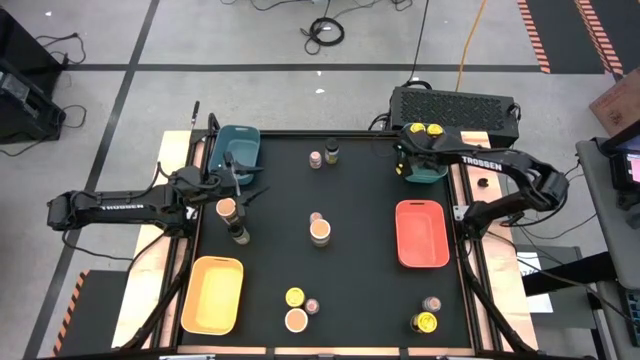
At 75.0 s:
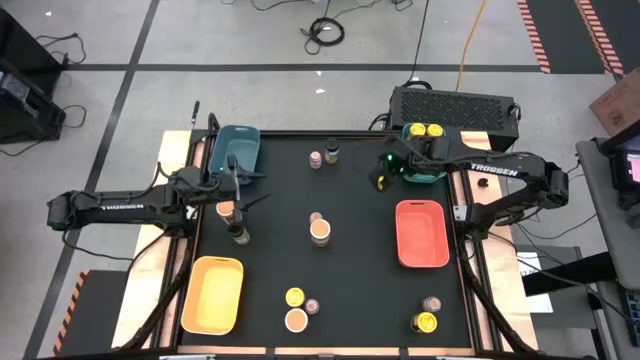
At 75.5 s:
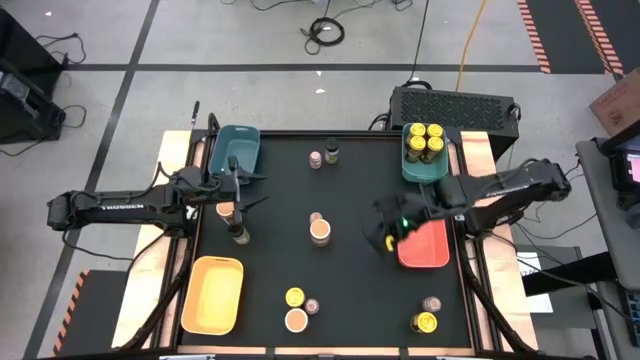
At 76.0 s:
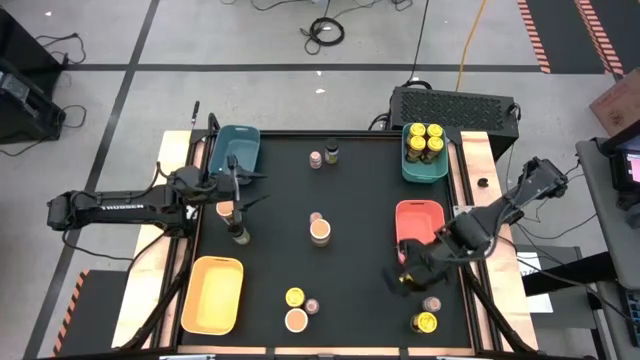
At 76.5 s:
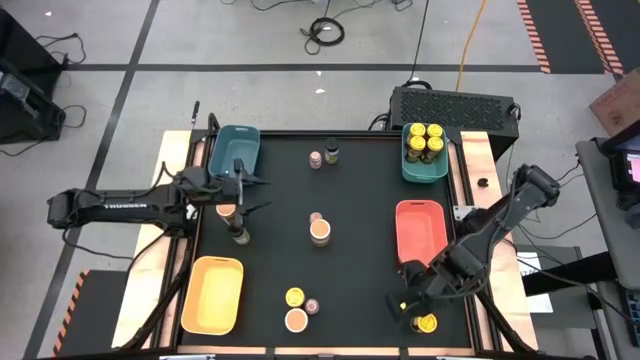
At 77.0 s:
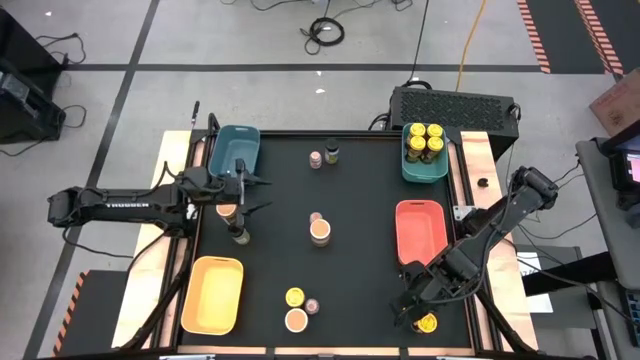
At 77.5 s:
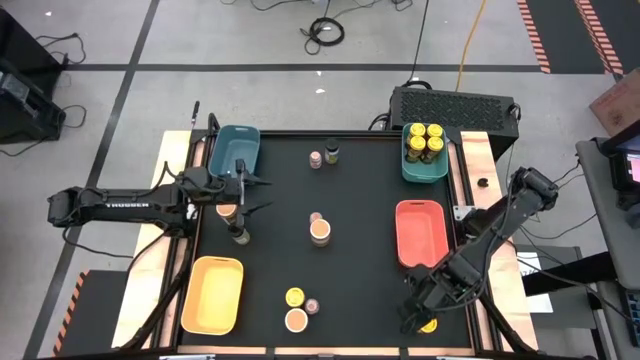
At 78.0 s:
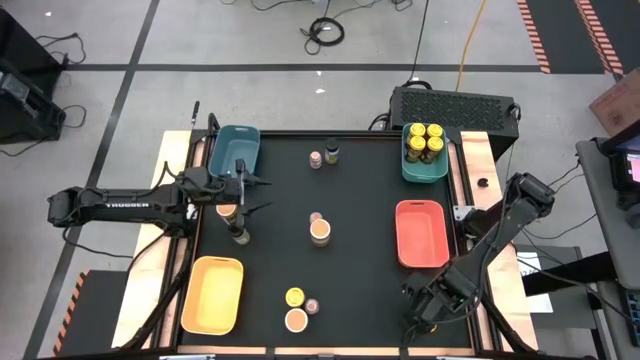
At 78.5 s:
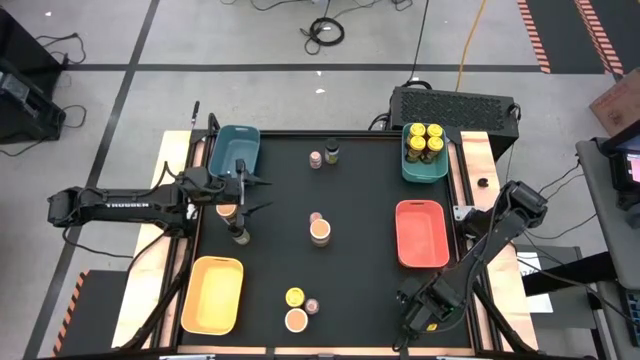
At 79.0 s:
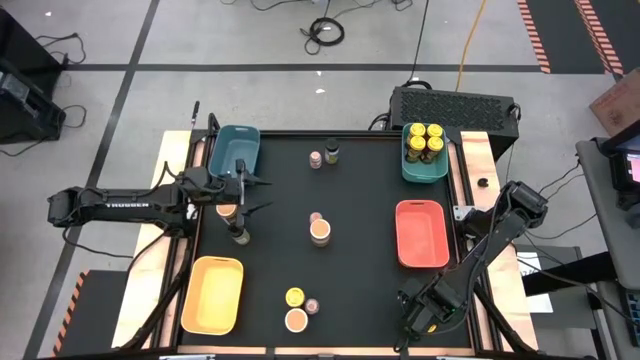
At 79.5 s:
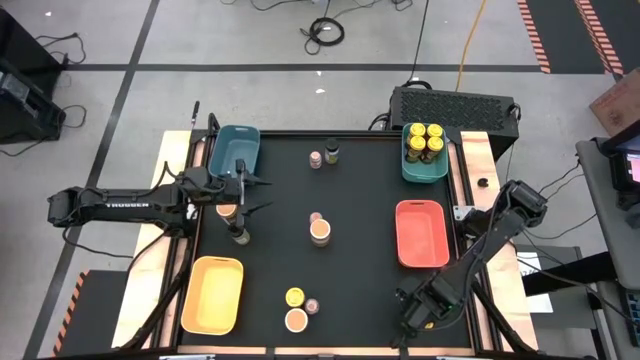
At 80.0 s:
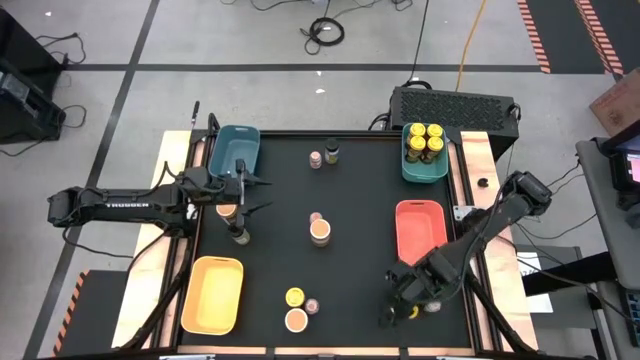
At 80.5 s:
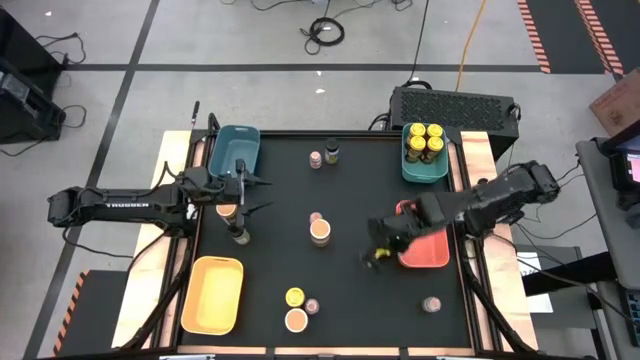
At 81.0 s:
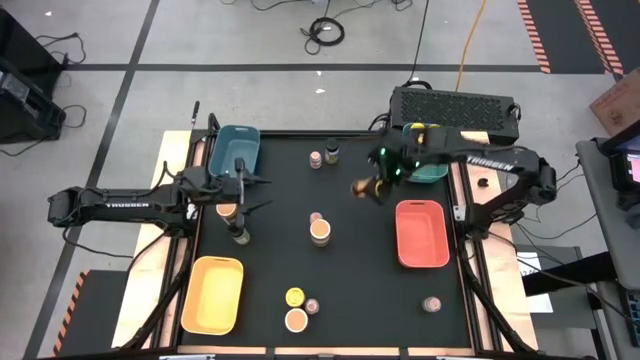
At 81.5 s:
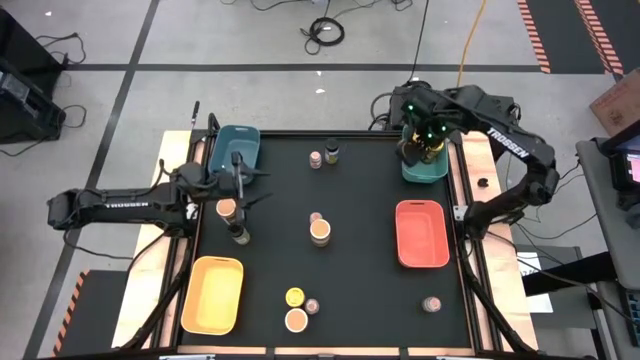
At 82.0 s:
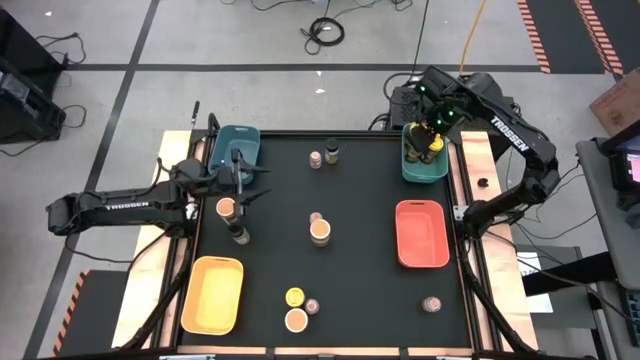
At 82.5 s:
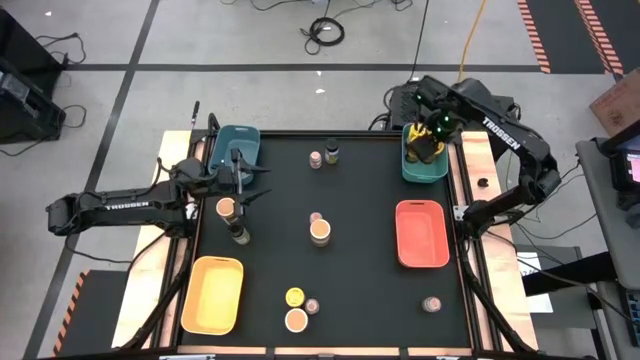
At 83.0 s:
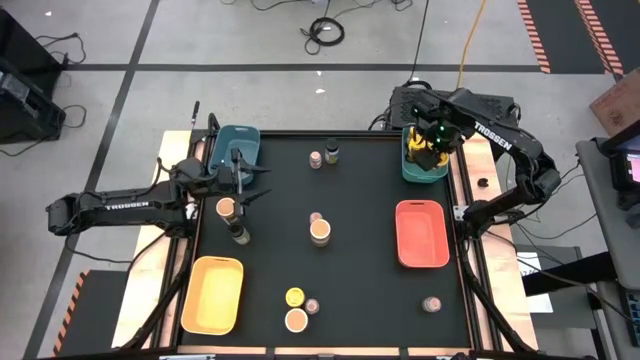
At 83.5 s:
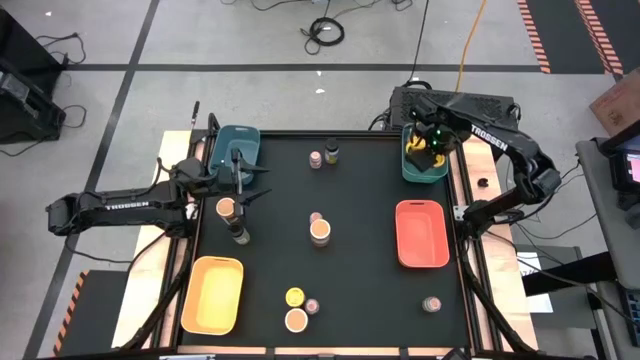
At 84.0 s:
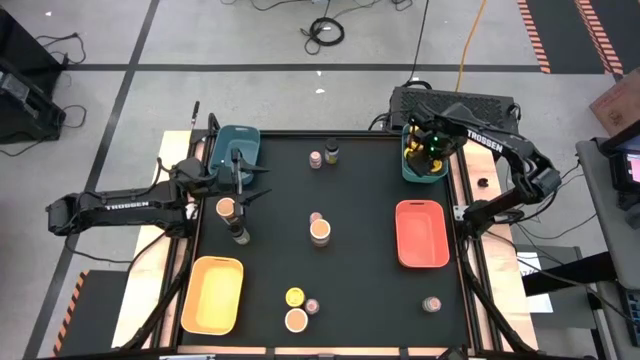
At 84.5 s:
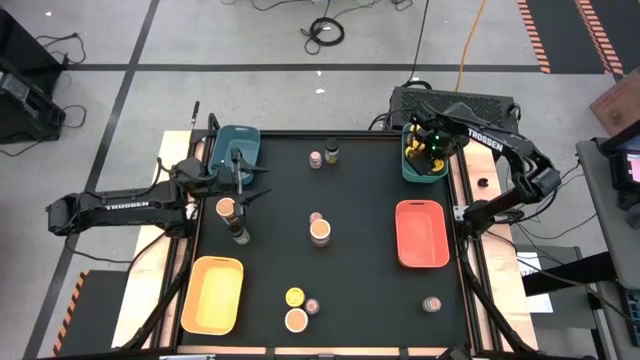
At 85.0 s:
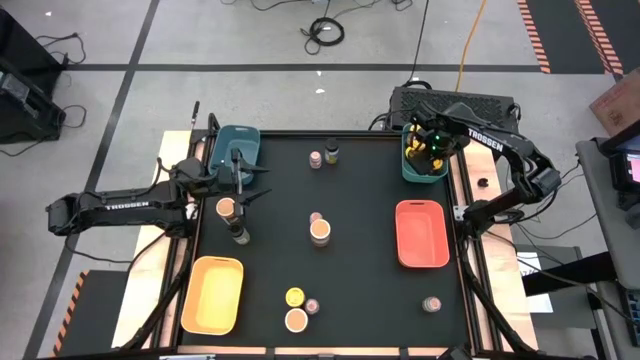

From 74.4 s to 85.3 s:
Task: Sort spices by type
Put the yellow spice bottle into the green bin

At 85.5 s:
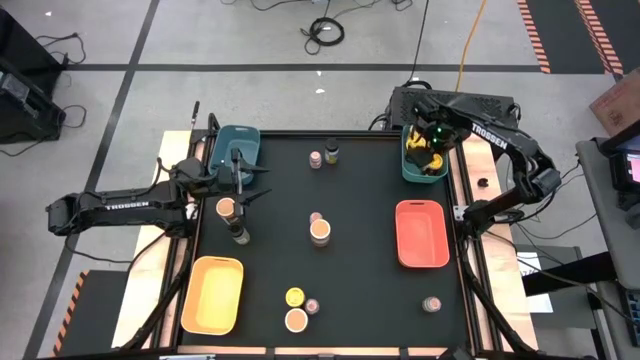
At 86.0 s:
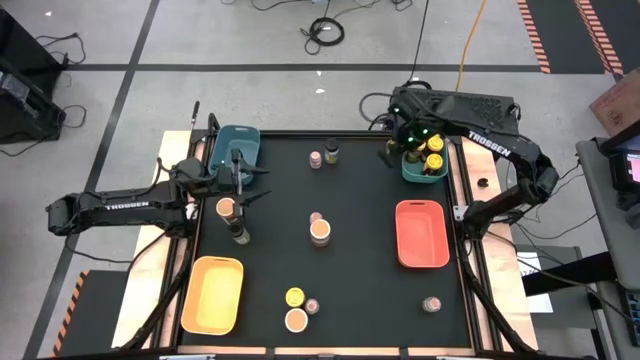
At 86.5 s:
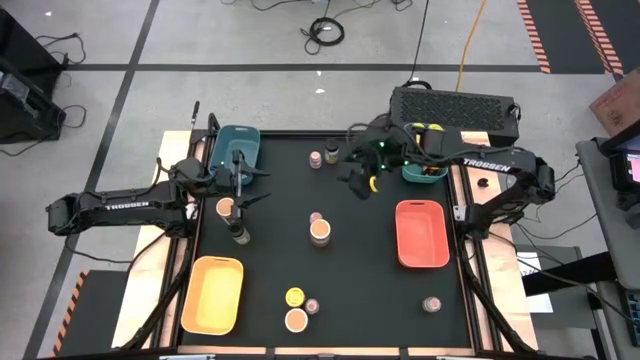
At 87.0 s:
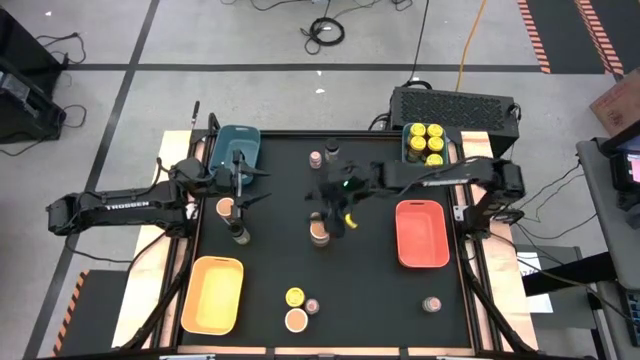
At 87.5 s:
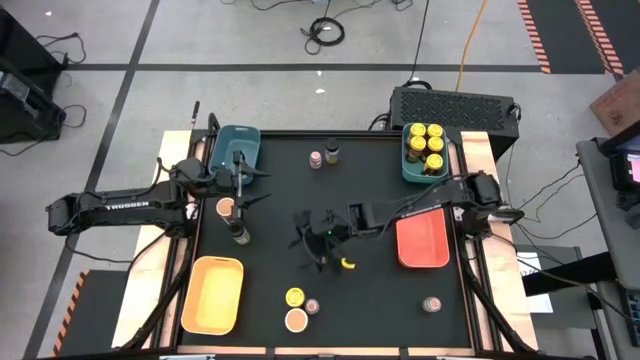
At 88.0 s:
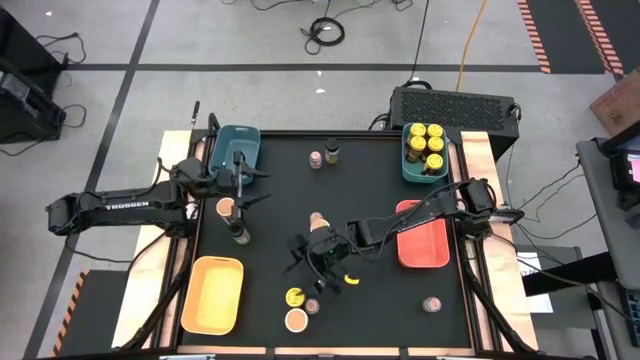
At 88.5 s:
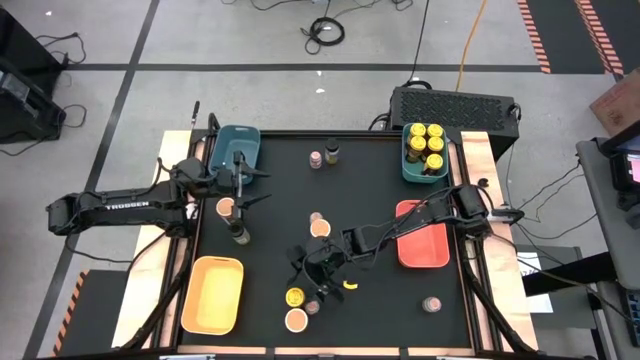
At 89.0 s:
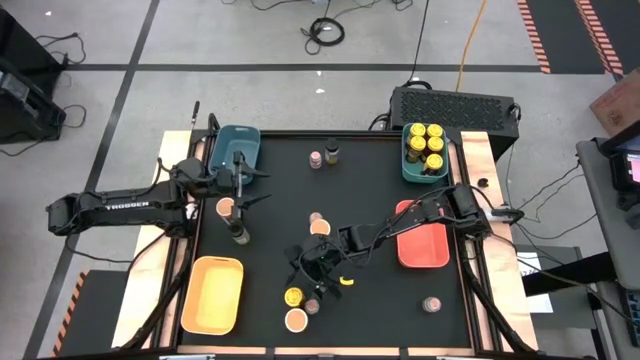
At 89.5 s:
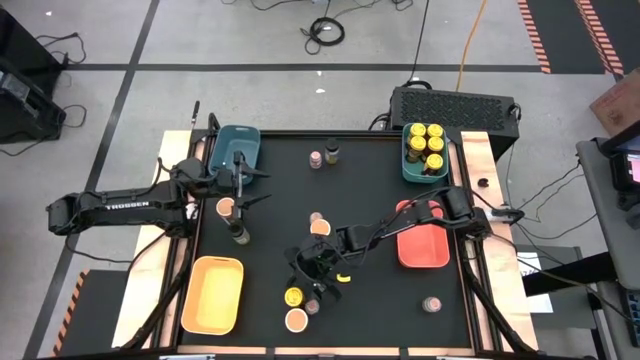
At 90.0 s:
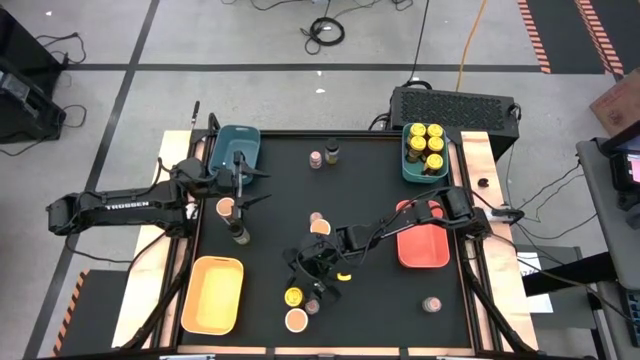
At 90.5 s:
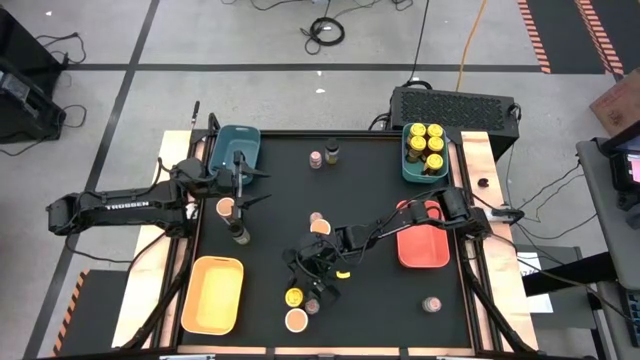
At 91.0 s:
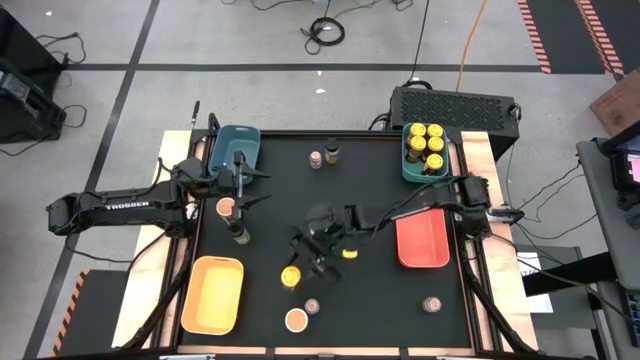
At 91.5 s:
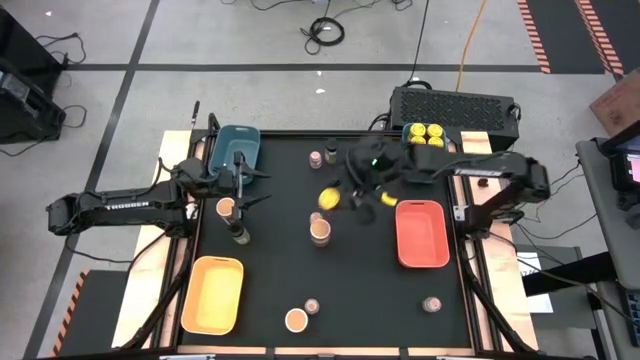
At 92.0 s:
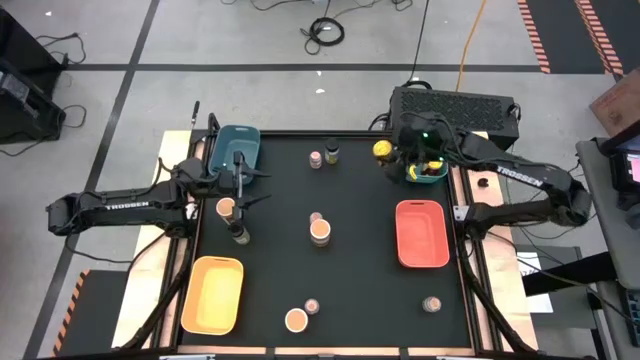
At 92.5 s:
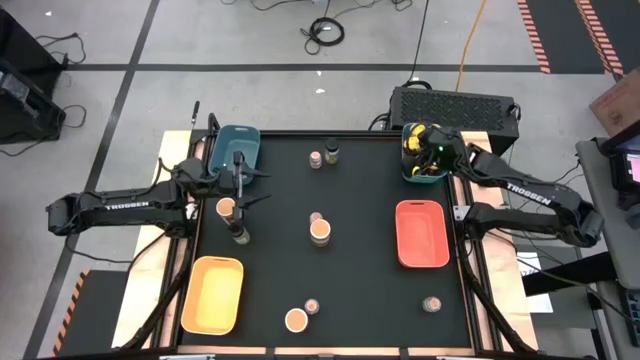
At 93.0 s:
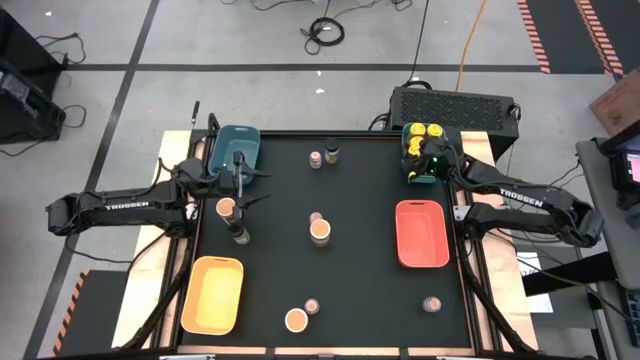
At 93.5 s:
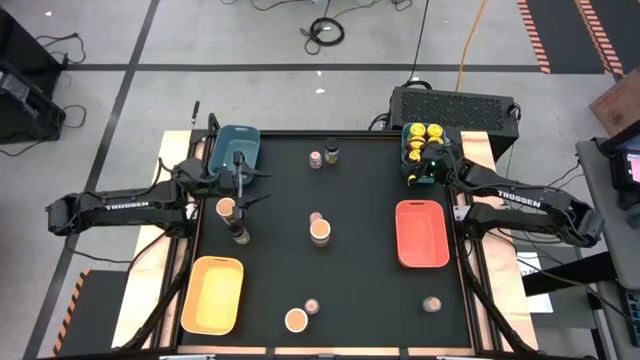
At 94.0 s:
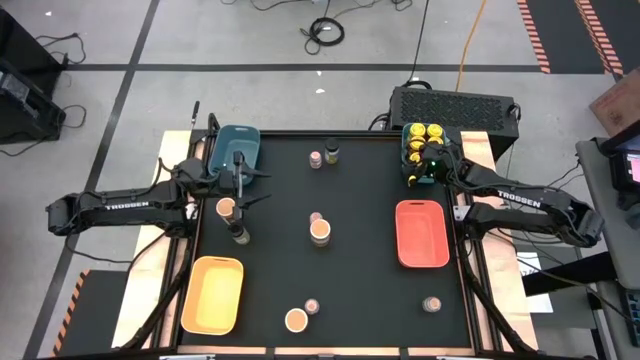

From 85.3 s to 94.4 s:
Put the yellow spice bottle into the green bin
